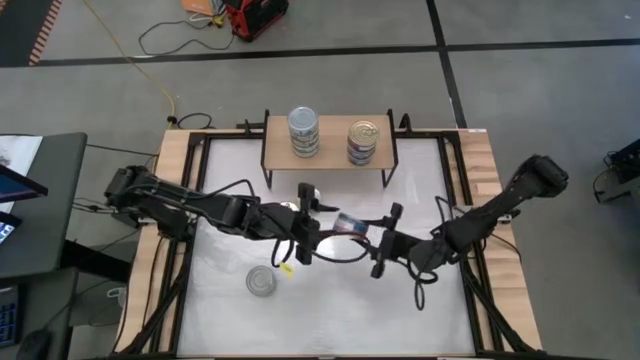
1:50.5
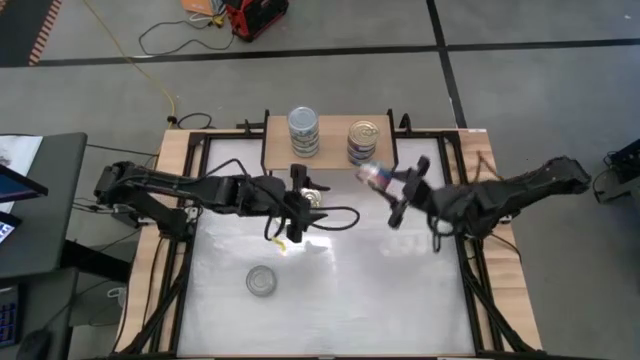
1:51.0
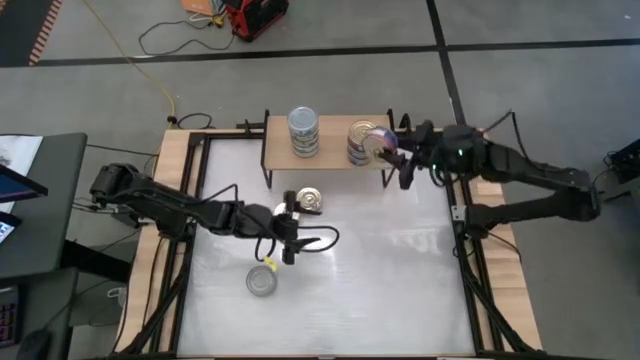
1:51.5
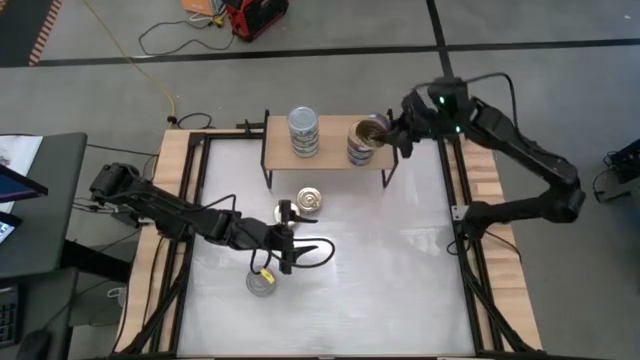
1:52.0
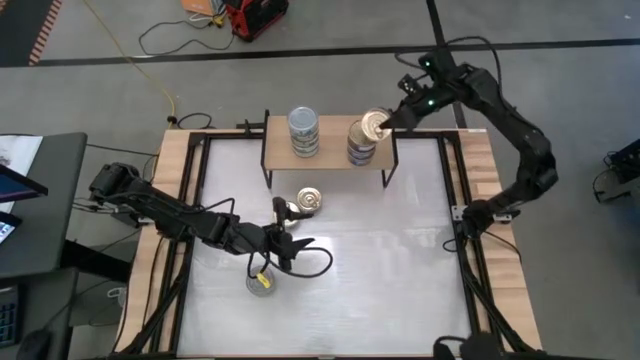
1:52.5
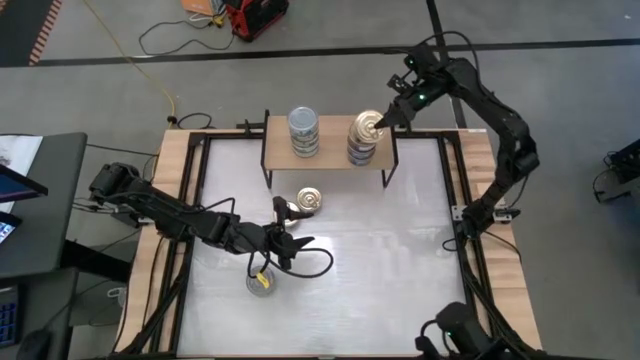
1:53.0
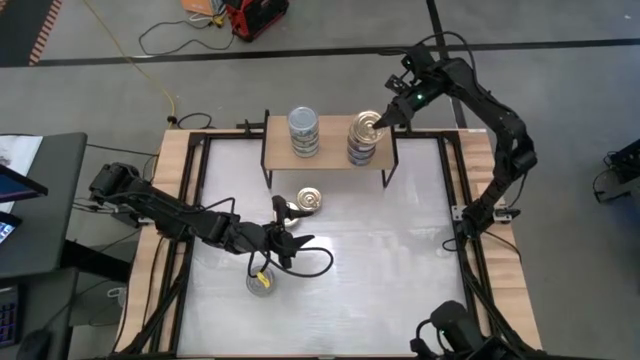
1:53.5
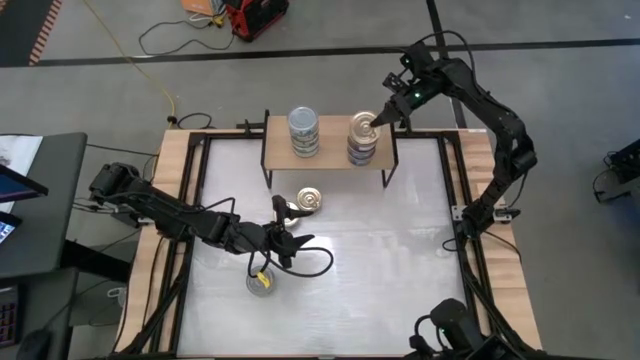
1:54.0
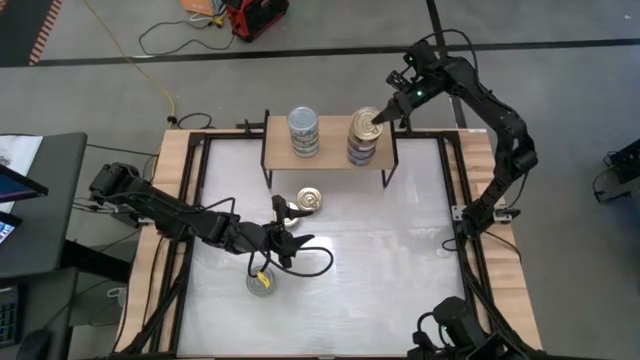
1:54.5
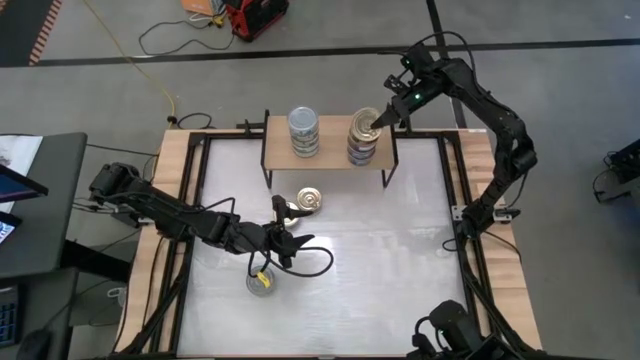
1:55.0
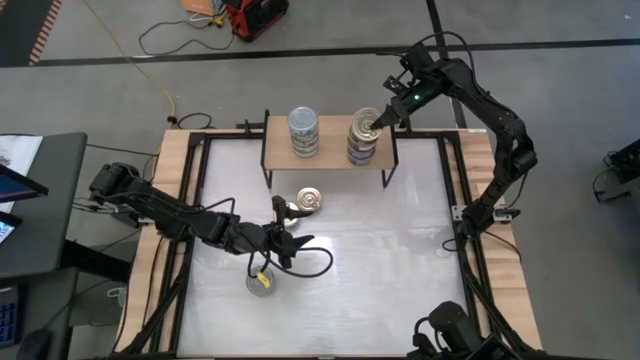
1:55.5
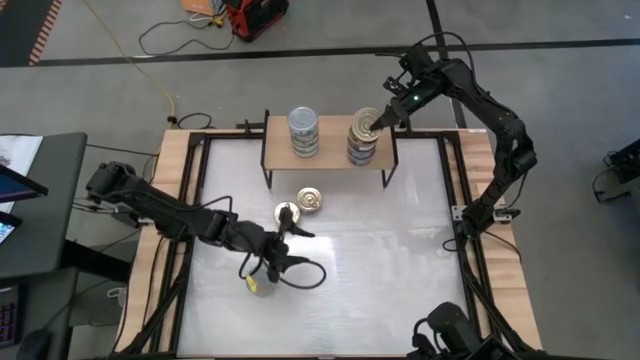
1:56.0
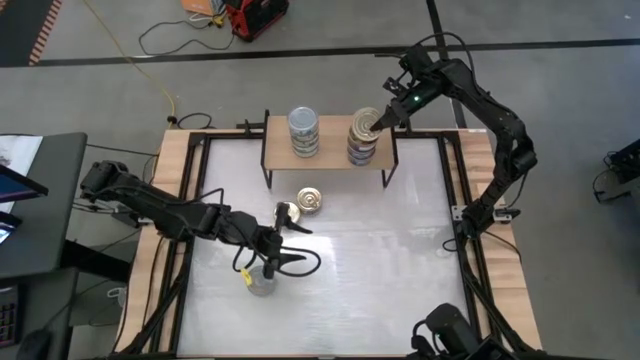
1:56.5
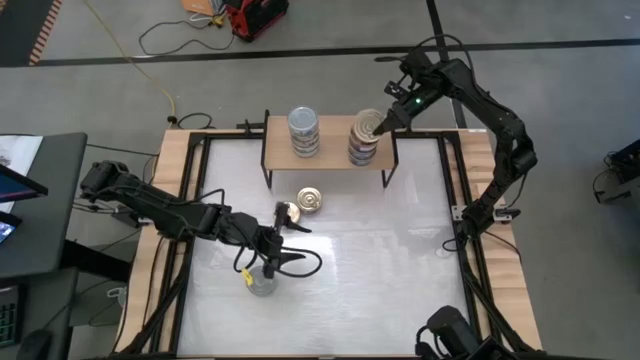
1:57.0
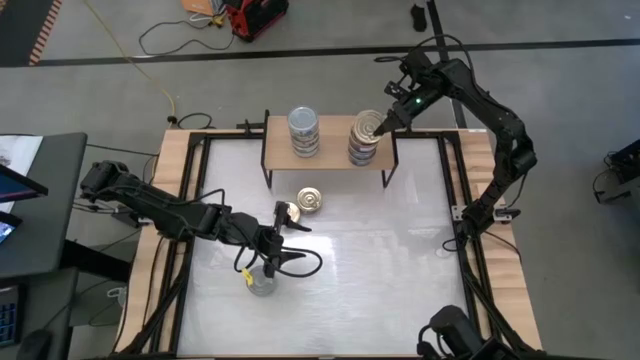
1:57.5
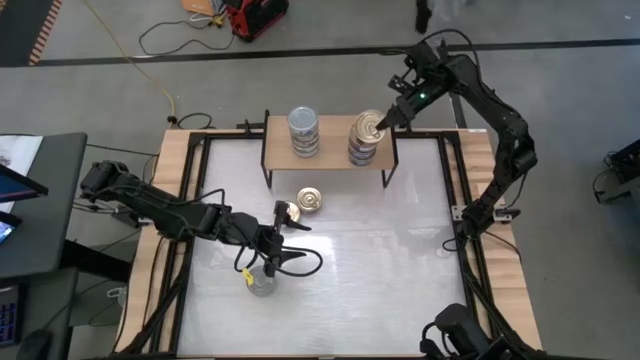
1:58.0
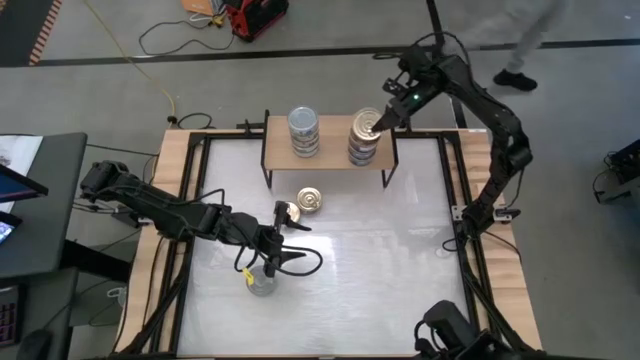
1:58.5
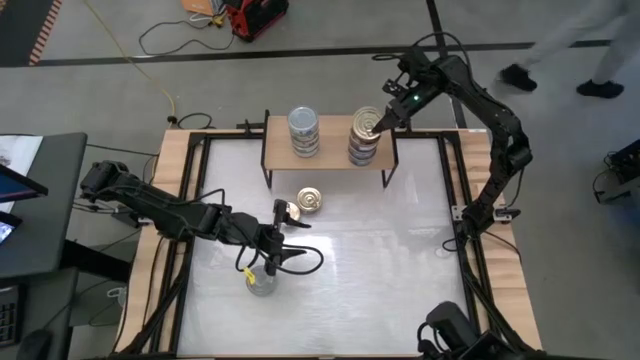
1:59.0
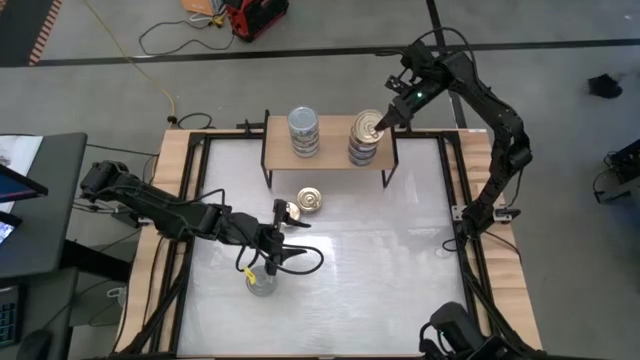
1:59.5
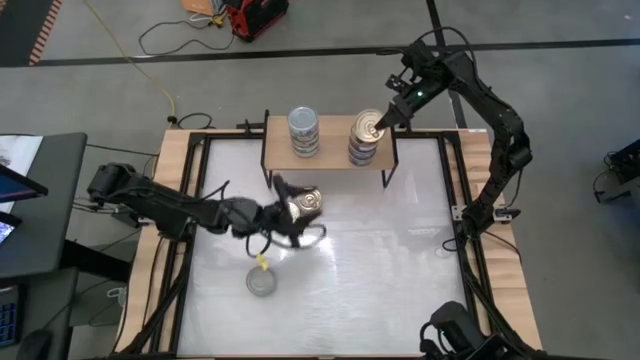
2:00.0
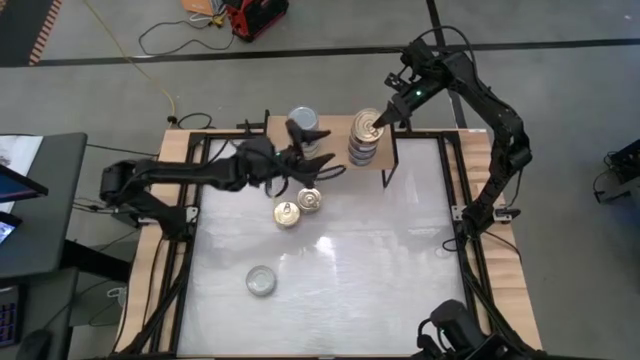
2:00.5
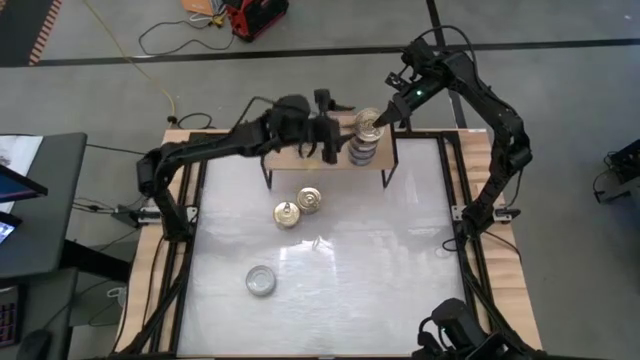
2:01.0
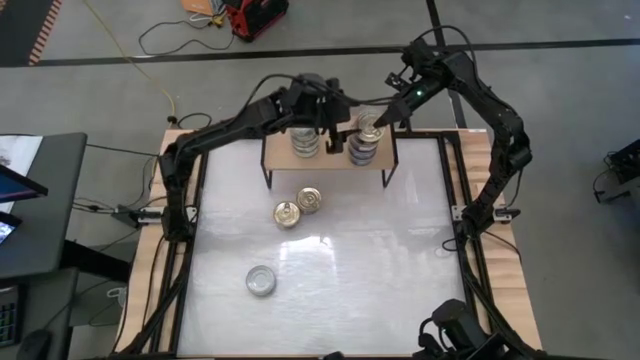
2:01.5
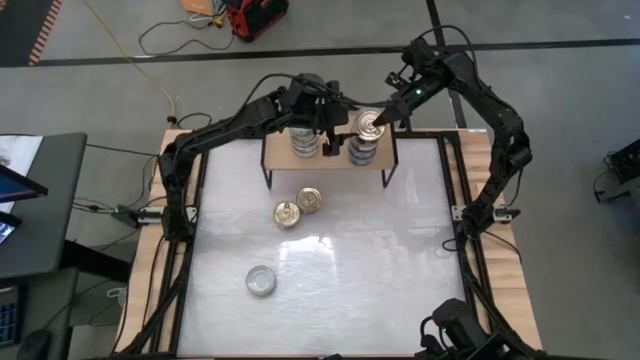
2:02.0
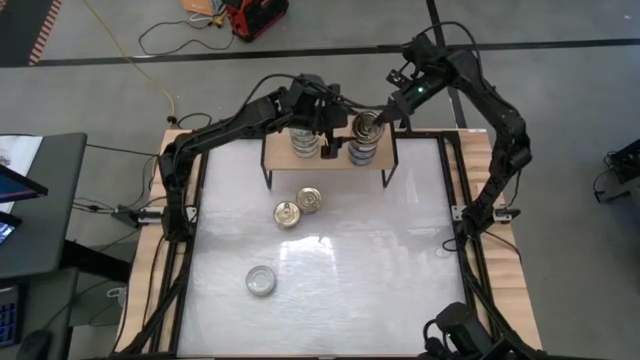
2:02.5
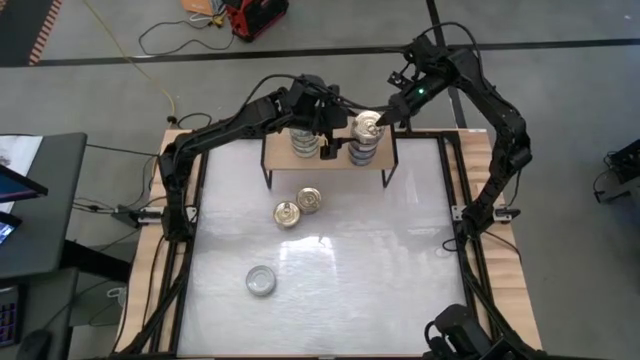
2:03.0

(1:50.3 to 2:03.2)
Task: Stack canned seafood by type on shelf
Stack the blue pink tuna can on top of the other blue and pink tuna cans on the shelf

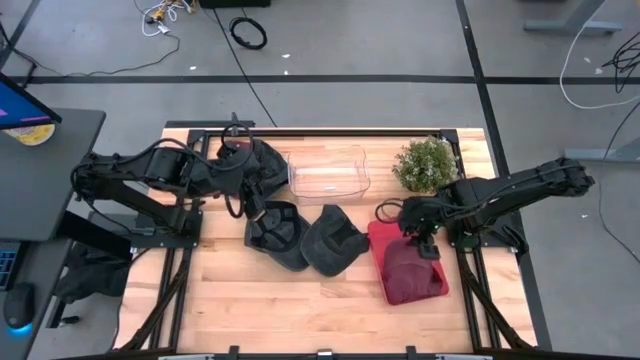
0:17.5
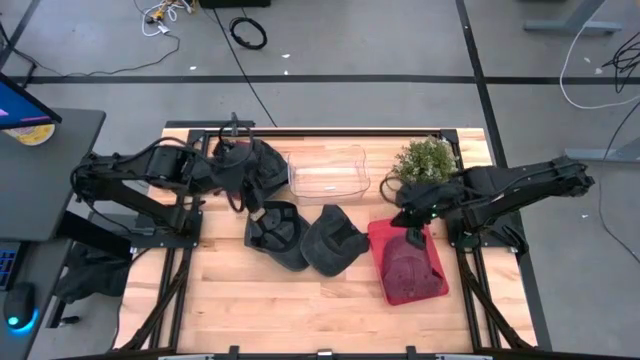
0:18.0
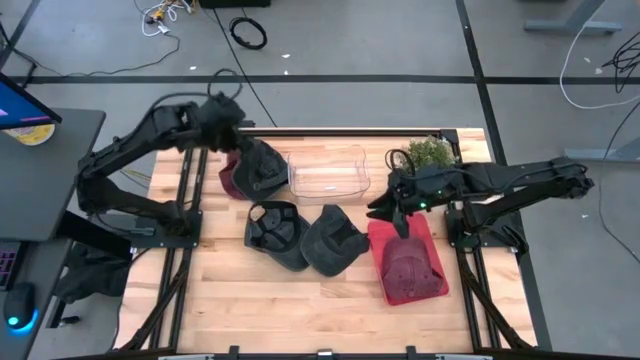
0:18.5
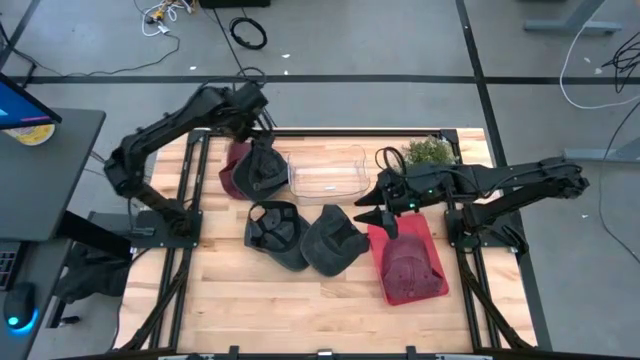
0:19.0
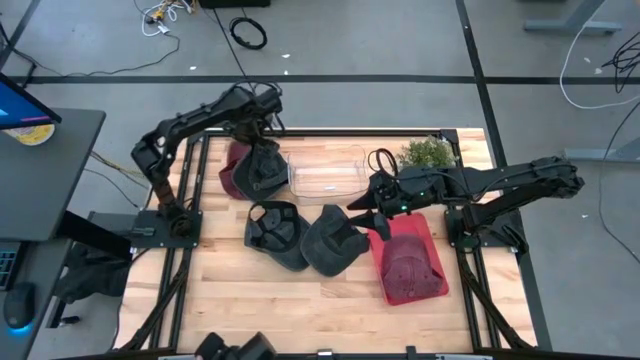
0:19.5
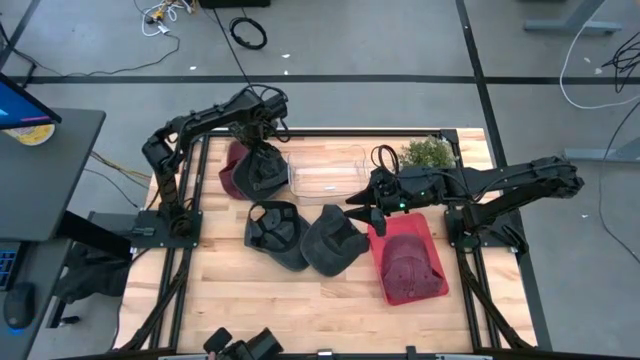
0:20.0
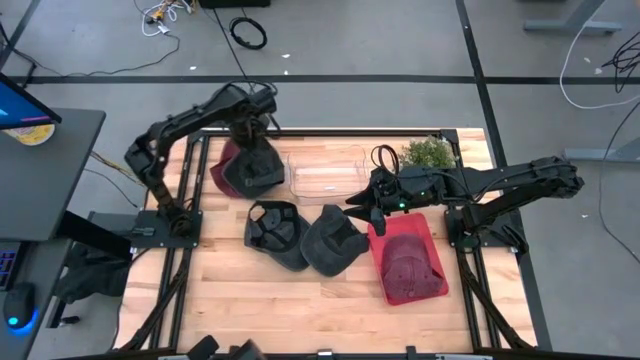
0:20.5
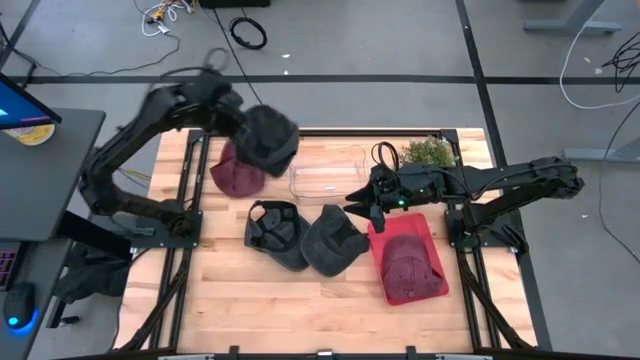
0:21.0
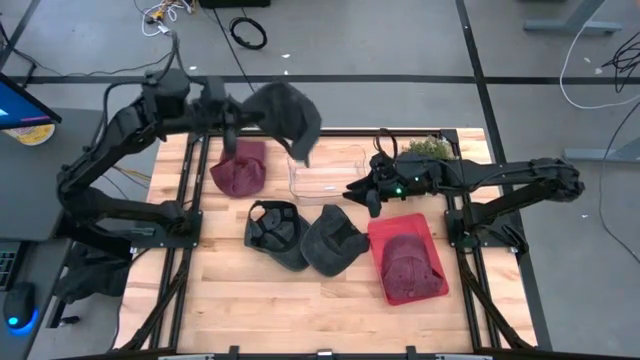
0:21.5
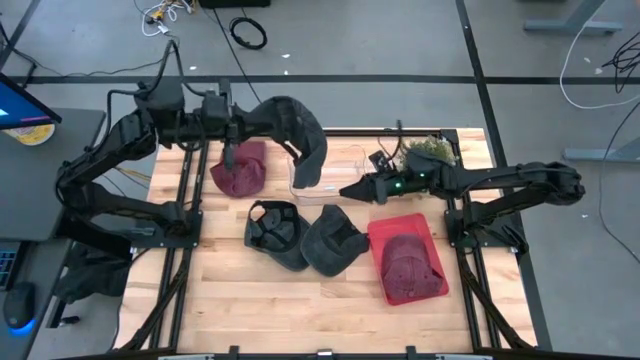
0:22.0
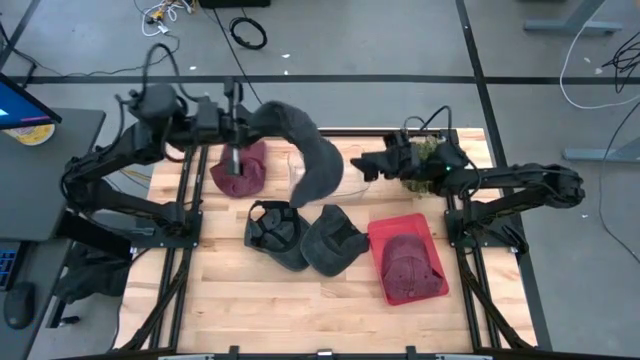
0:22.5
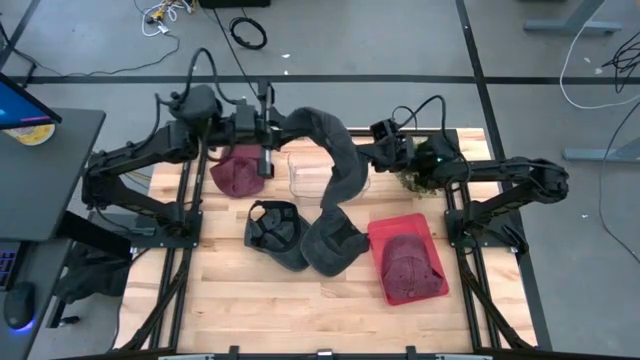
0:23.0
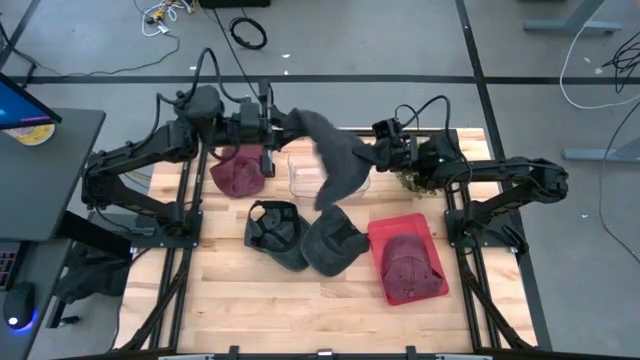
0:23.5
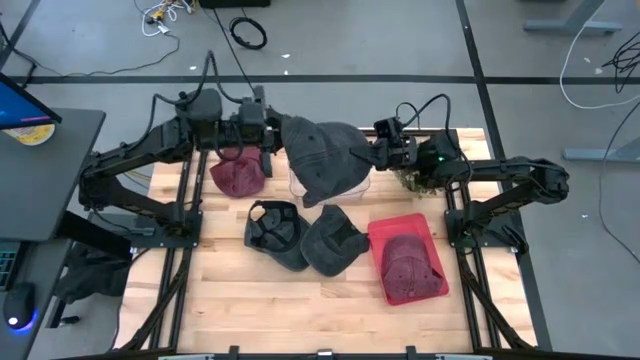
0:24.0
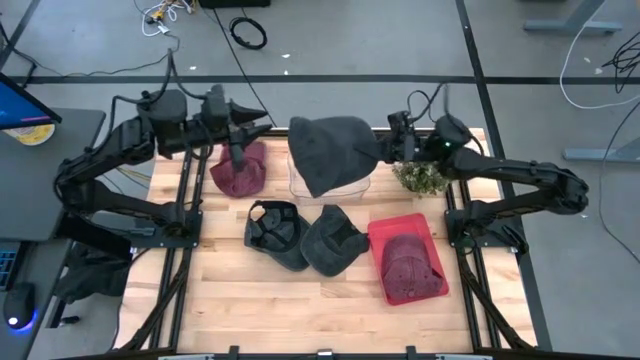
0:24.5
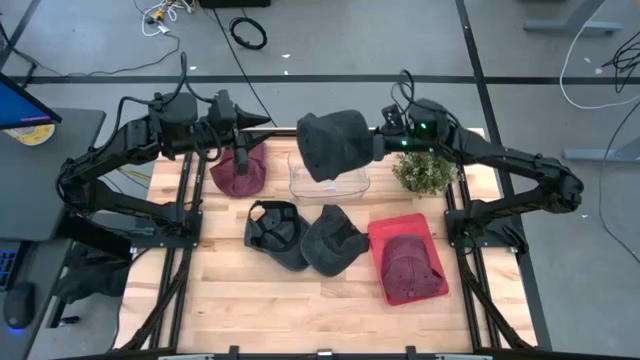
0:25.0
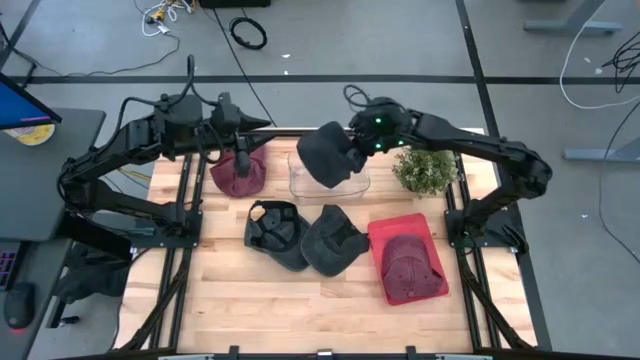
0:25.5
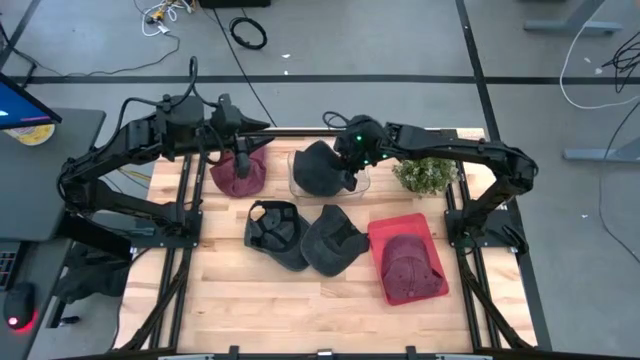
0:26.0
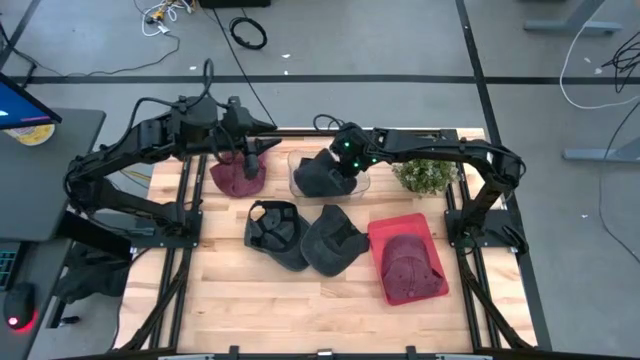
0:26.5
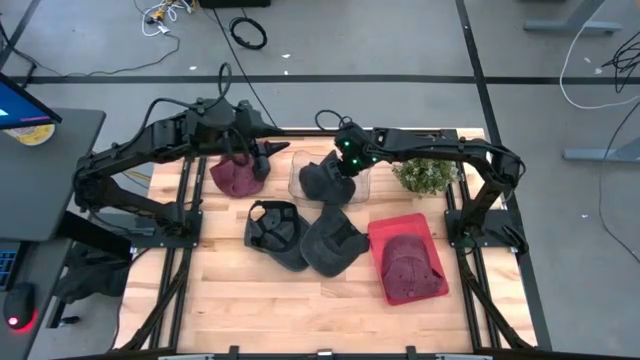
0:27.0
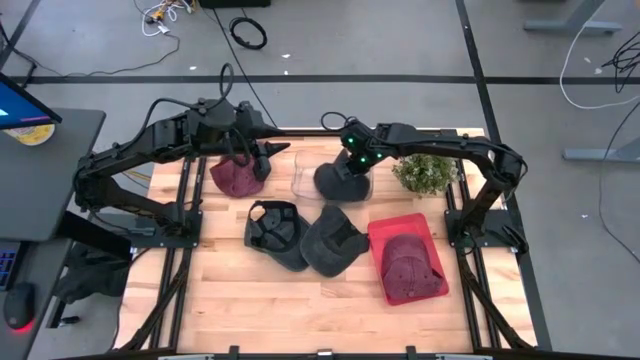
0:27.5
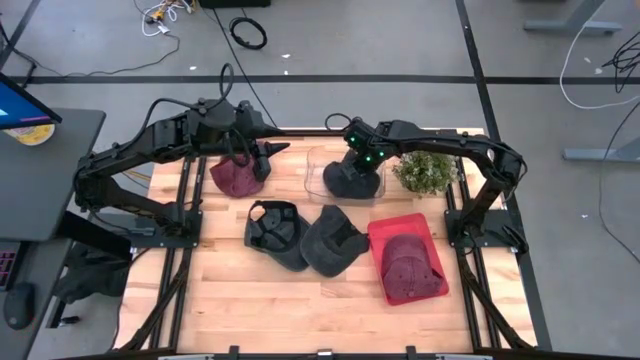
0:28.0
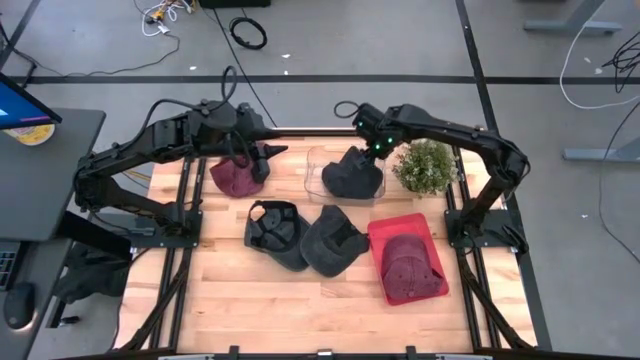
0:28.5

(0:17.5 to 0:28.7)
Task: Pick & Place hat
Put the top black cap into the transparent bin
